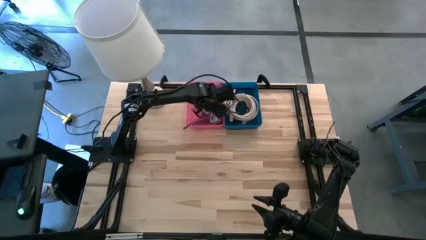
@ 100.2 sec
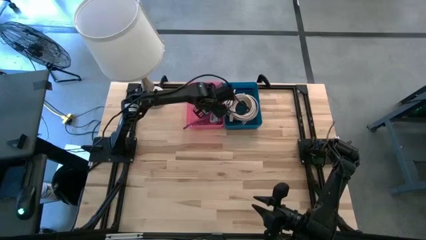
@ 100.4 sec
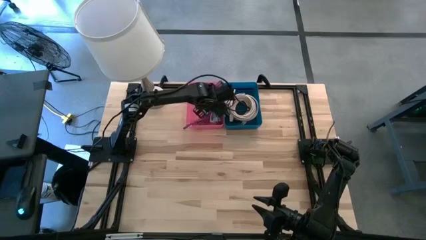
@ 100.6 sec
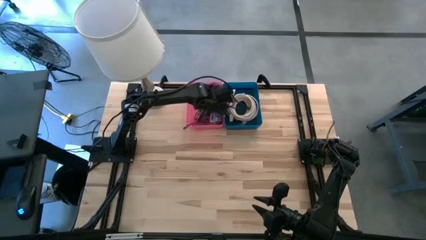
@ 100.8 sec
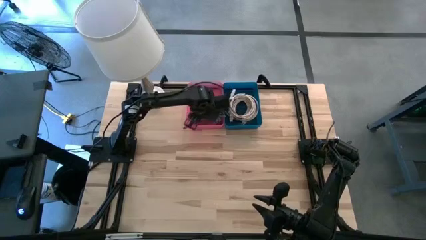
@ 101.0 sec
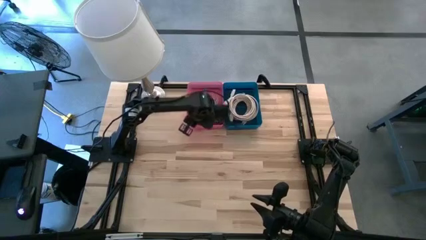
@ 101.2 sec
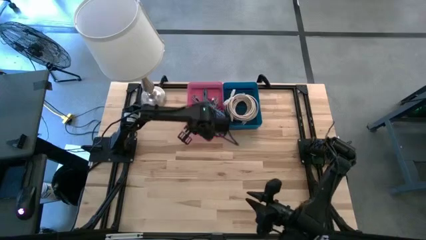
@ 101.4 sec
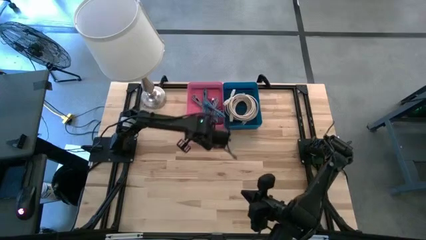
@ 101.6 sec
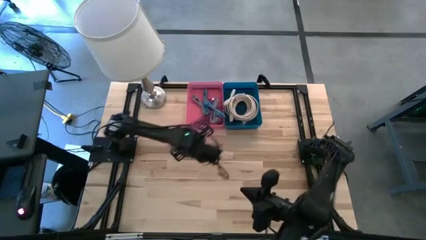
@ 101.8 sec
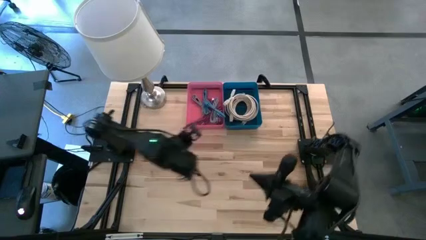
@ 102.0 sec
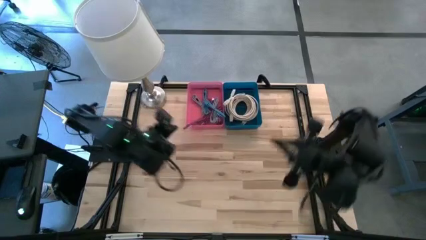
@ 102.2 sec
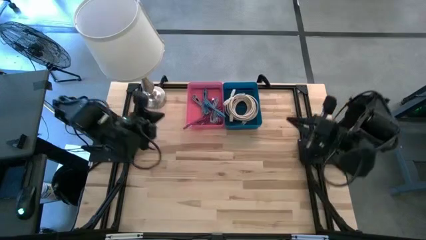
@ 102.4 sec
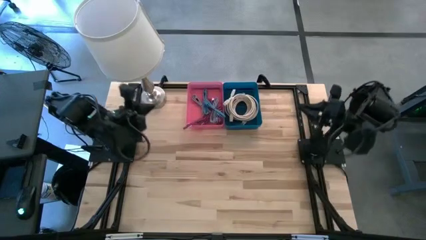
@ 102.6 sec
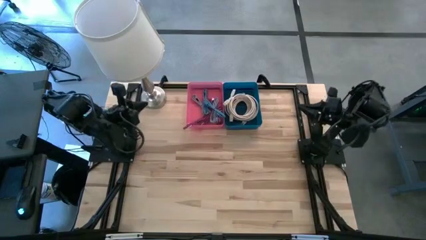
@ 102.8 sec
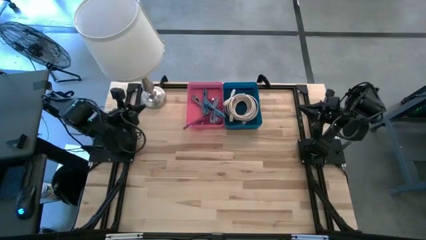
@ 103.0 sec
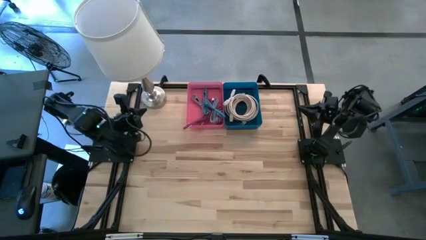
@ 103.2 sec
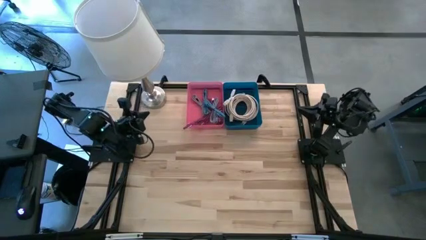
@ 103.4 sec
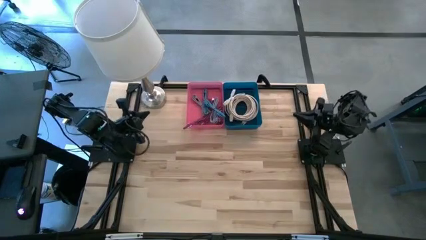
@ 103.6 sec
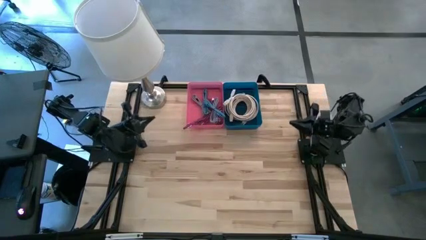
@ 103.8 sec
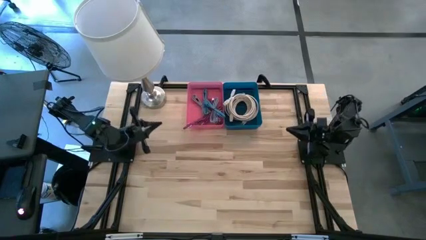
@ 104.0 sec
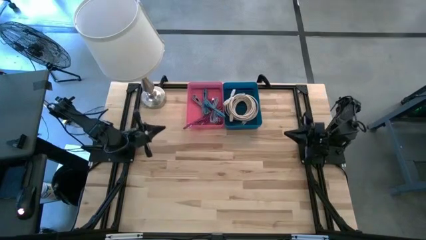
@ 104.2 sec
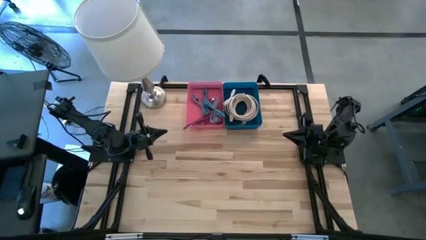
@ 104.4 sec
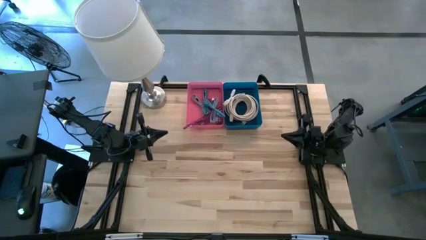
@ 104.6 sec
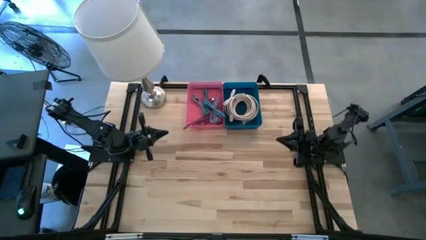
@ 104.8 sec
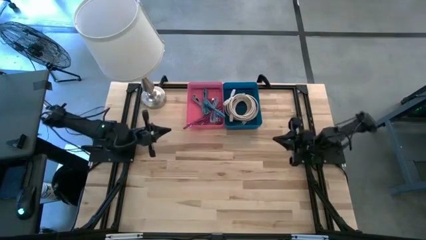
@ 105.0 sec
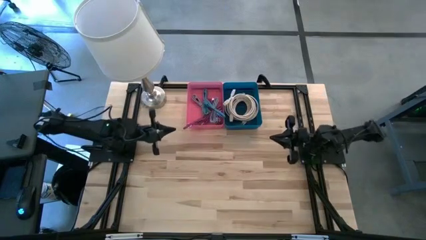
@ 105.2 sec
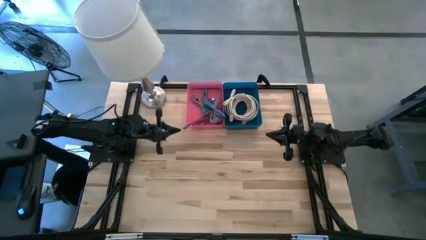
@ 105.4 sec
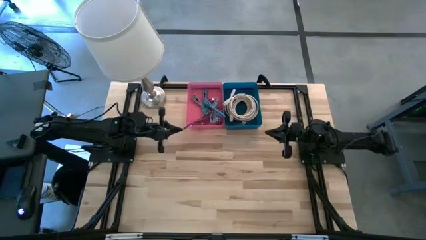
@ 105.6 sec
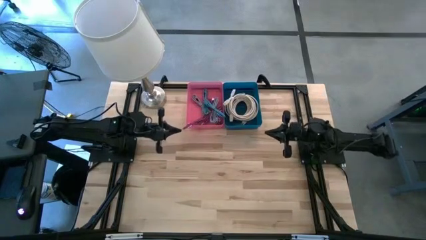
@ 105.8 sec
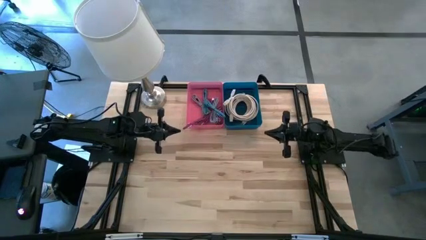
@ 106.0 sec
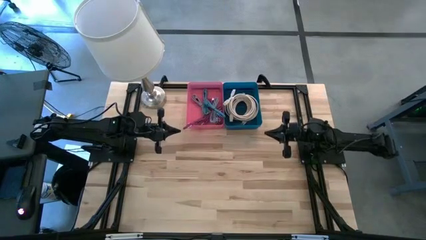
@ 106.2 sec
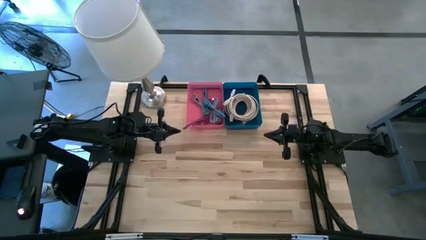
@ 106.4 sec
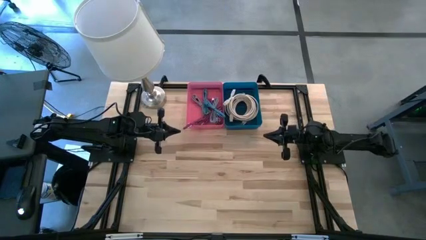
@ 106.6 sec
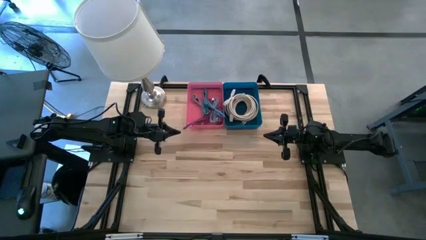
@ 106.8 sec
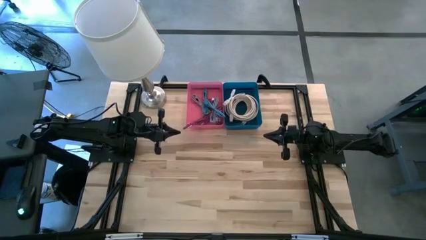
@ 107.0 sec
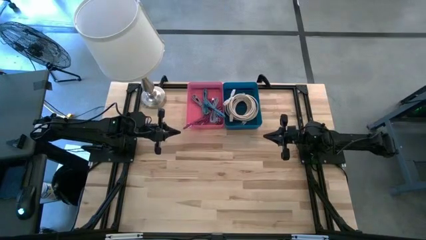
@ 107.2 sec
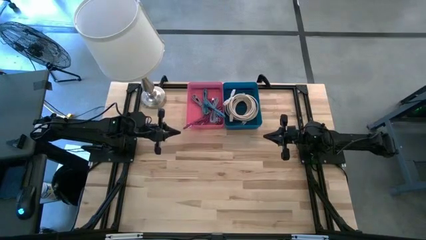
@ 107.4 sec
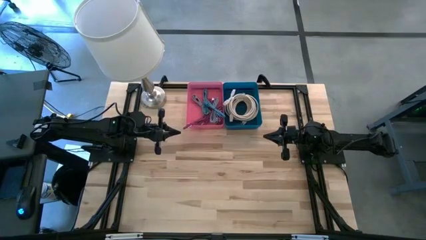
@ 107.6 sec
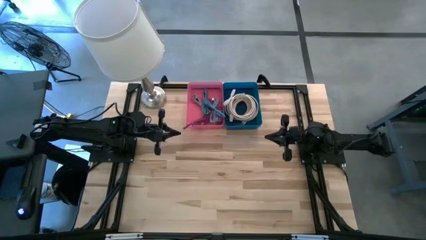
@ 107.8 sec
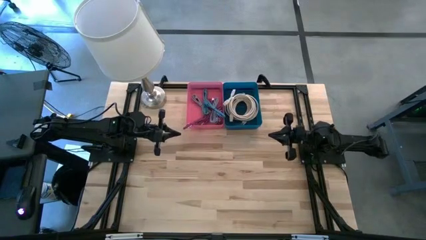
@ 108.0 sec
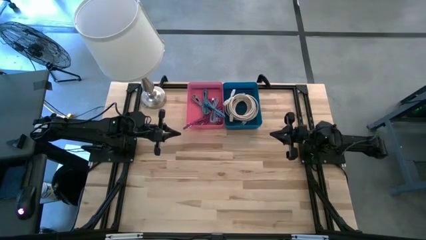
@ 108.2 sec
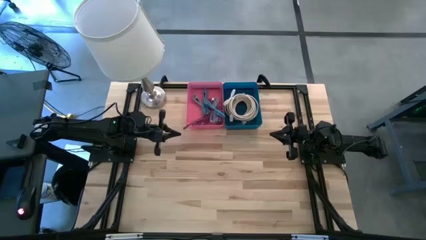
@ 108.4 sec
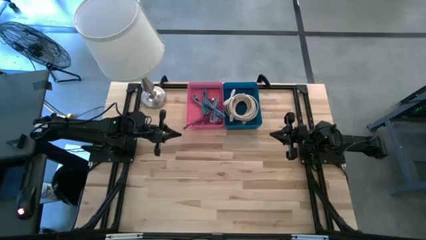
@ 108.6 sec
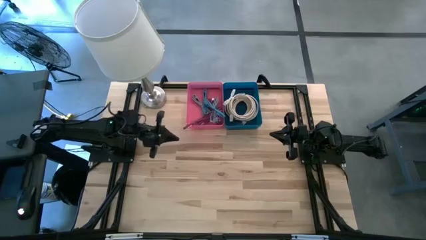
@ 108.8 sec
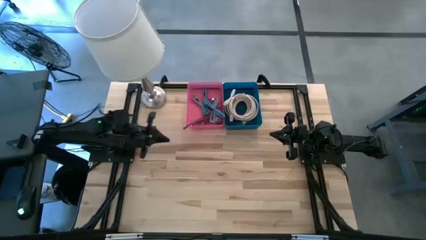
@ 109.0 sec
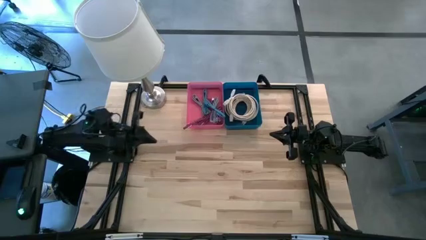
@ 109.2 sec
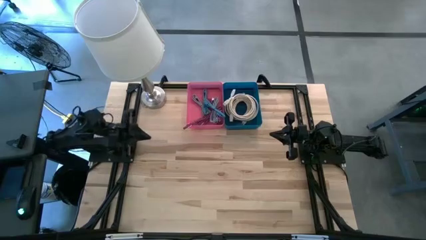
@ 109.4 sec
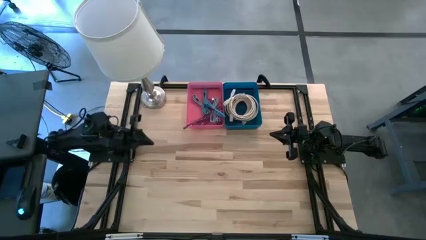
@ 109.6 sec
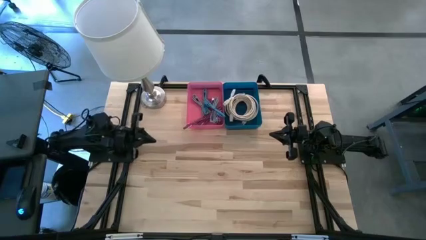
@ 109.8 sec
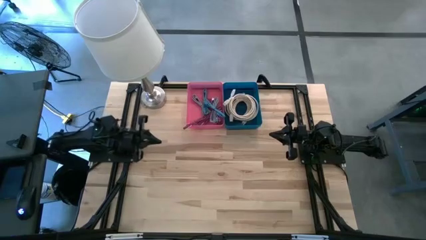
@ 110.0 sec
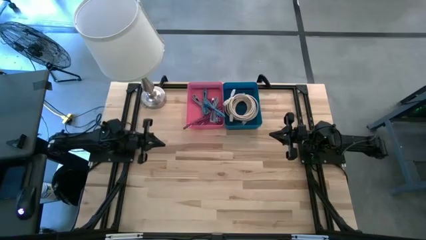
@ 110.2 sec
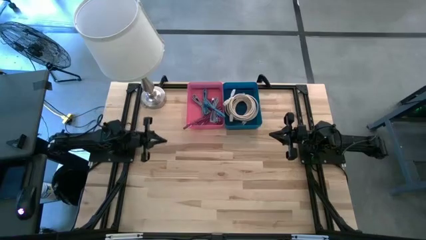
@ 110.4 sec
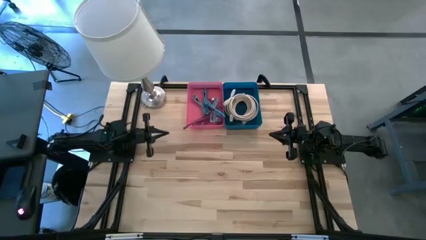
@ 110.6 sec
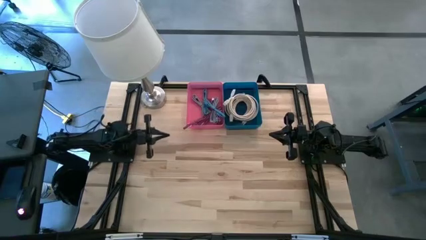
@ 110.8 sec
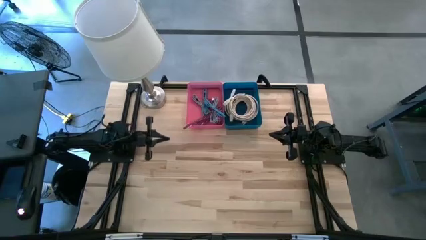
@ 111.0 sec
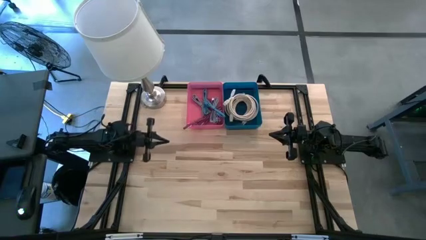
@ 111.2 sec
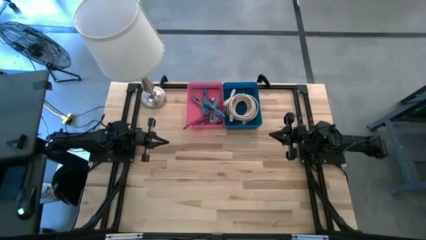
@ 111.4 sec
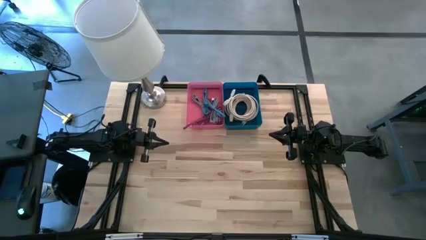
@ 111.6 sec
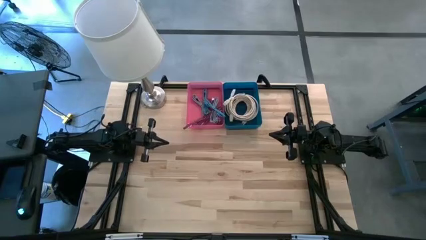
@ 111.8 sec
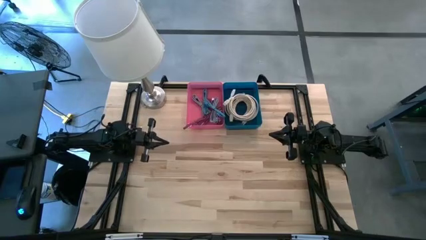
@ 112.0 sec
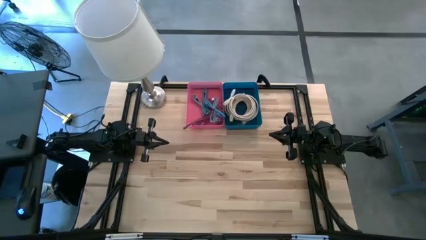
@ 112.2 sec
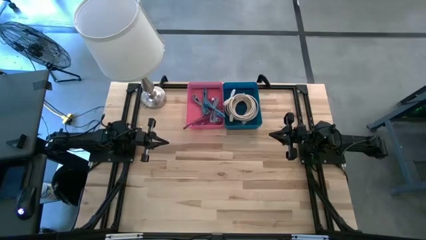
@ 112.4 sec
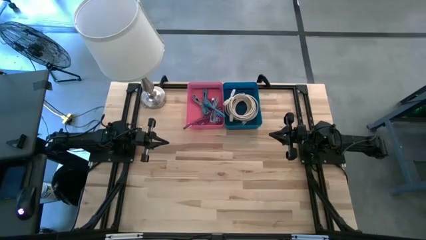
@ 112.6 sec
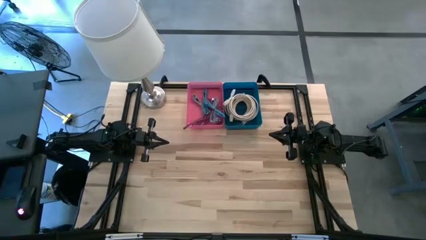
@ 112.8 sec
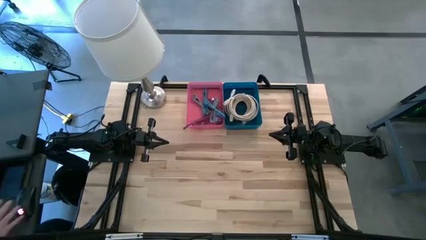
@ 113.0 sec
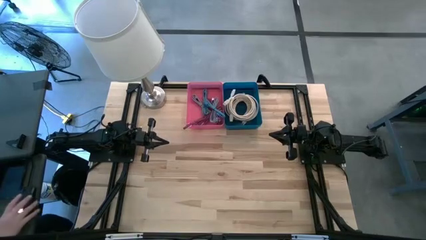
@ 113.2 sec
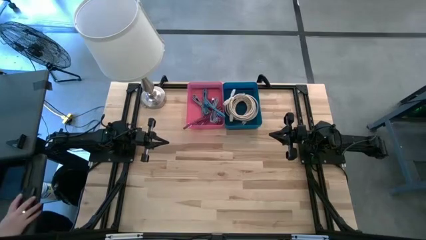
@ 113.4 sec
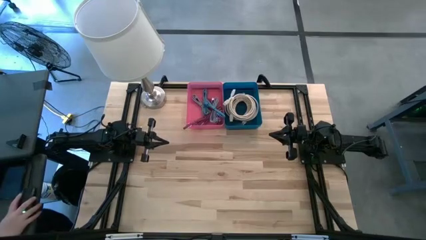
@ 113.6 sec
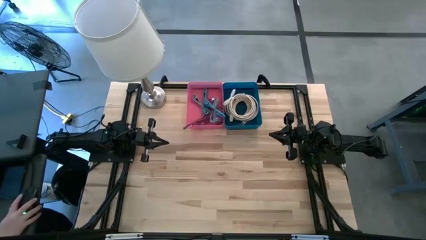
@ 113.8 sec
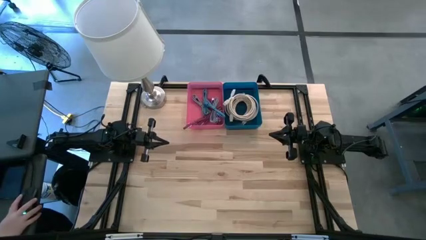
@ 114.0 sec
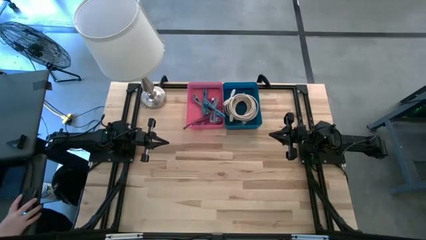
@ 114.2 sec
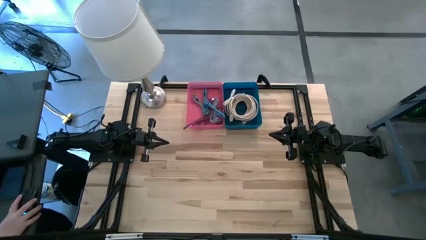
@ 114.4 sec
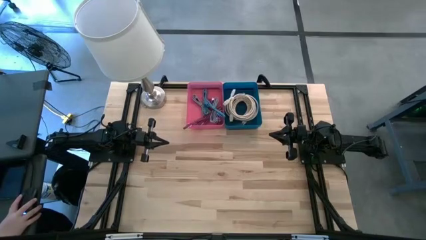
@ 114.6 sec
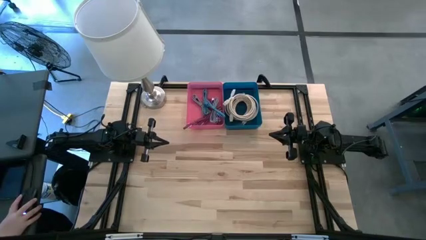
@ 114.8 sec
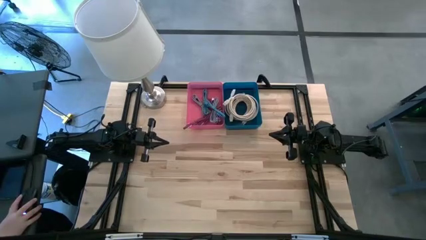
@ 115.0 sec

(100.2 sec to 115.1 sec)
Task: Pick & Place USB Port
Return to Home Position

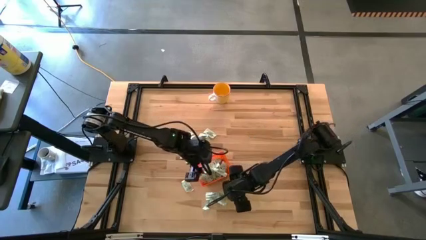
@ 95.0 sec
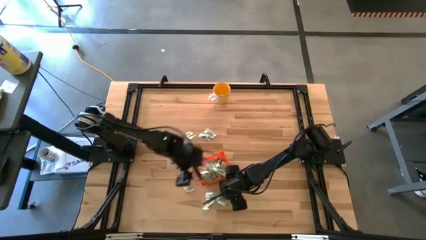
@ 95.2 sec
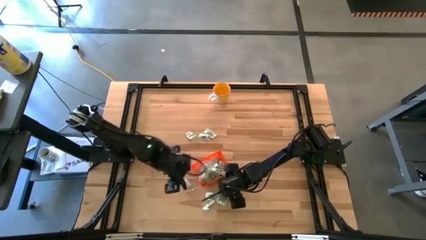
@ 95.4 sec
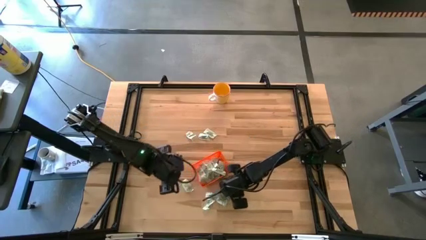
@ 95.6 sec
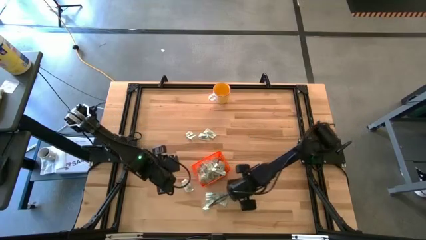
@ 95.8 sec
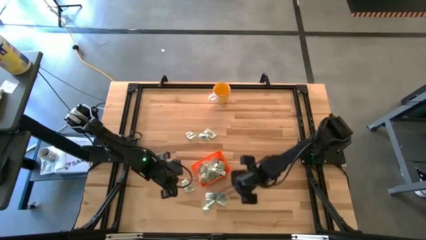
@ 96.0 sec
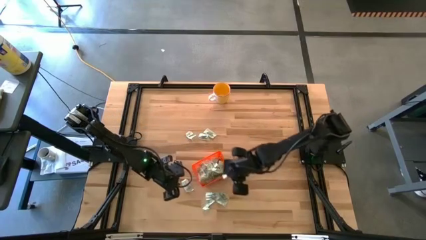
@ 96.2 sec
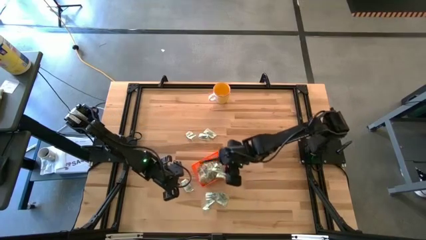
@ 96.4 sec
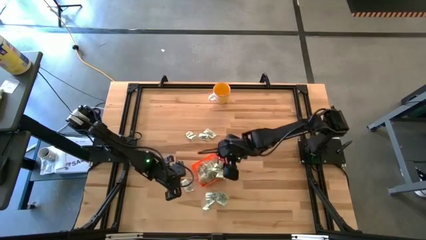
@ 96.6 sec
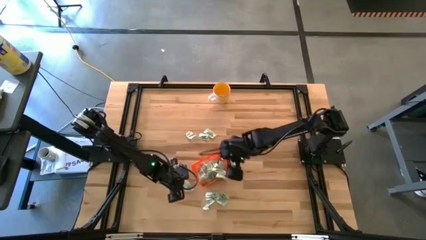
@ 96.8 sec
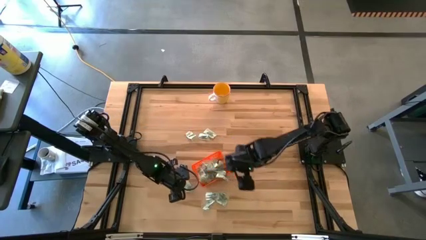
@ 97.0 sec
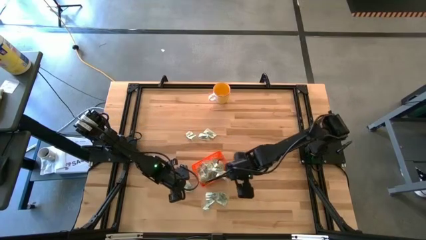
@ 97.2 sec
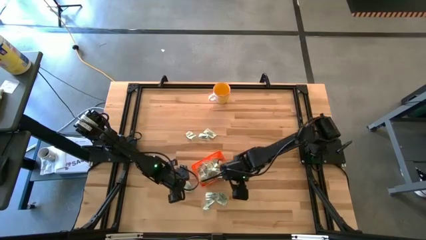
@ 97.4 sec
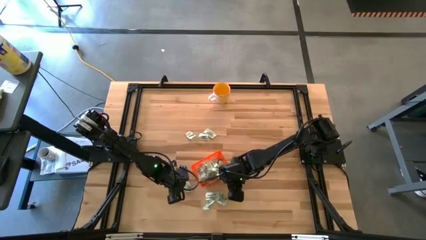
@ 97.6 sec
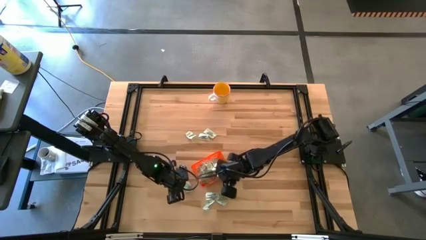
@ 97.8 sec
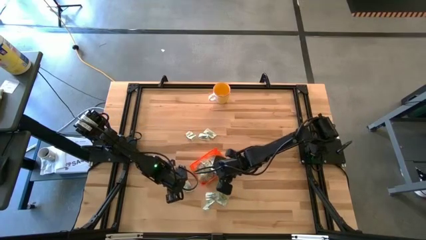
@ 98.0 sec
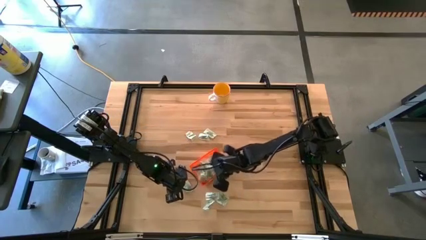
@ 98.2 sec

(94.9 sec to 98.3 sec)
Task: Pick and place Stevia / Truvia into bins
Put the stevia packet into the bin
